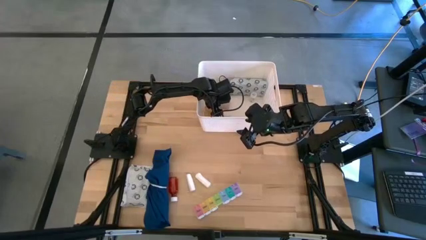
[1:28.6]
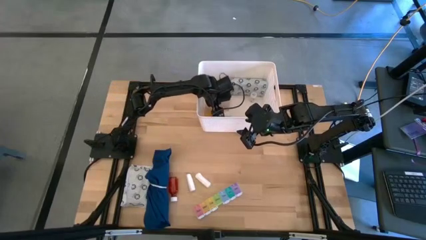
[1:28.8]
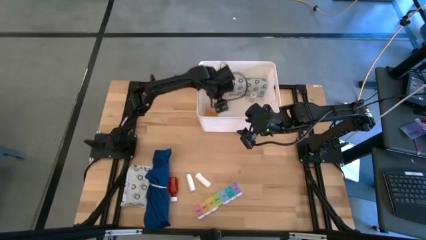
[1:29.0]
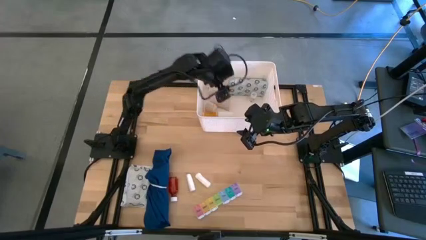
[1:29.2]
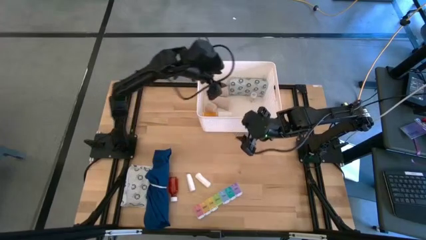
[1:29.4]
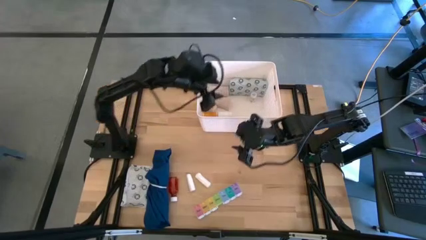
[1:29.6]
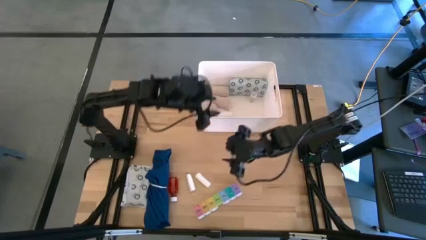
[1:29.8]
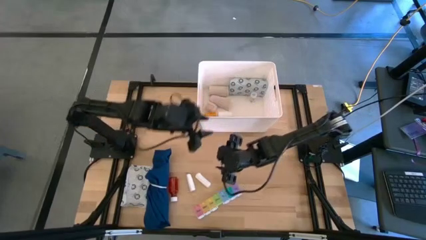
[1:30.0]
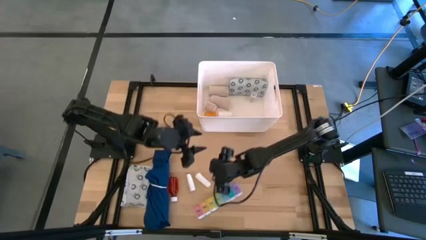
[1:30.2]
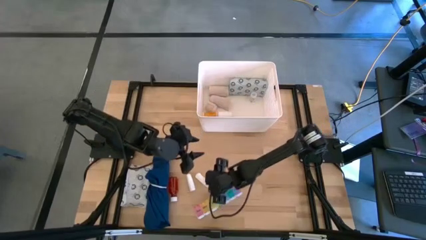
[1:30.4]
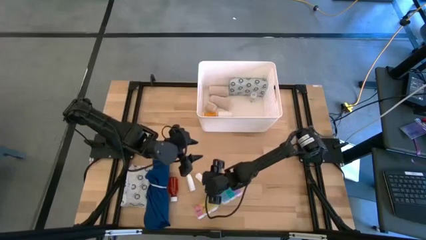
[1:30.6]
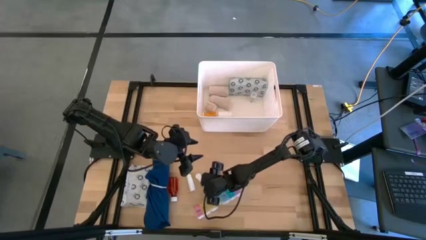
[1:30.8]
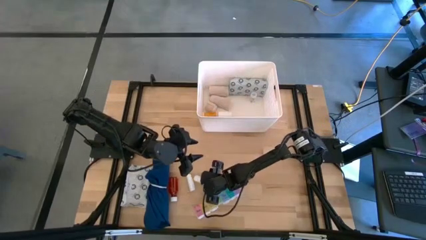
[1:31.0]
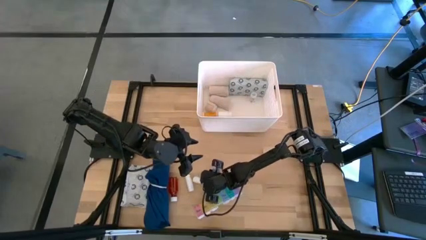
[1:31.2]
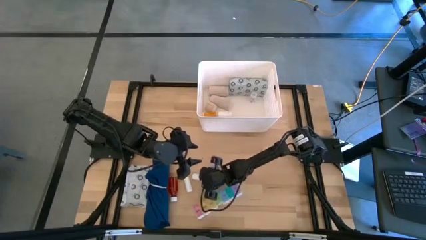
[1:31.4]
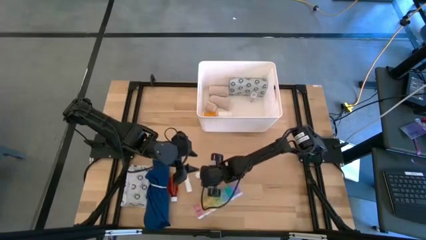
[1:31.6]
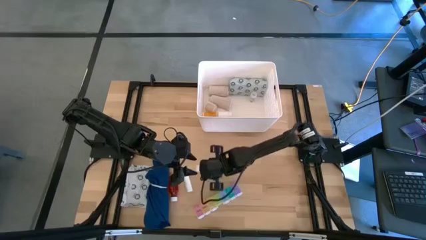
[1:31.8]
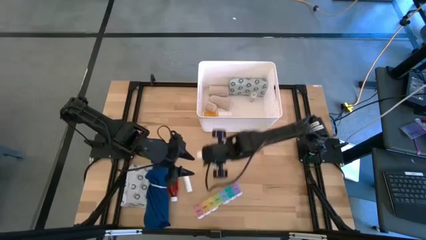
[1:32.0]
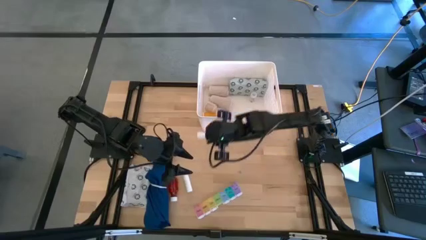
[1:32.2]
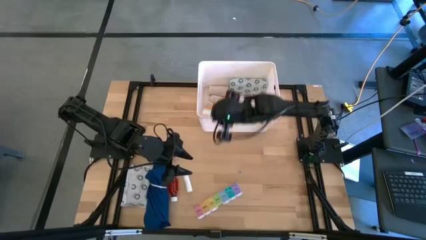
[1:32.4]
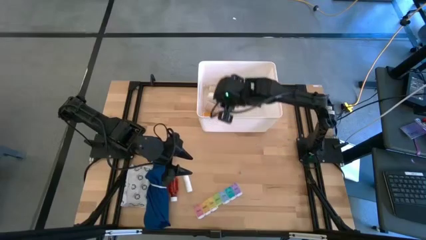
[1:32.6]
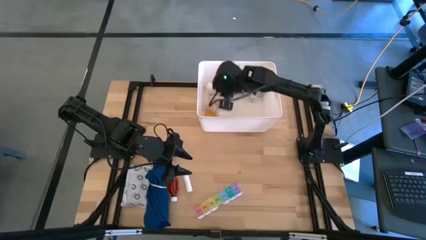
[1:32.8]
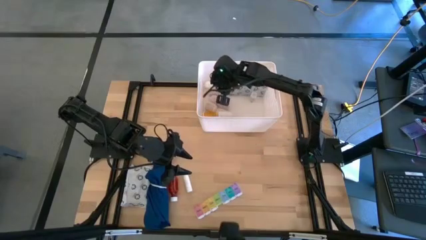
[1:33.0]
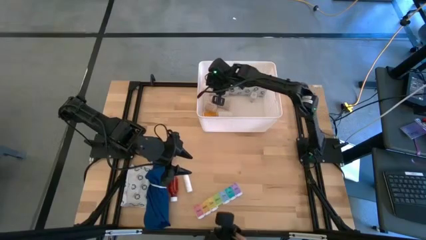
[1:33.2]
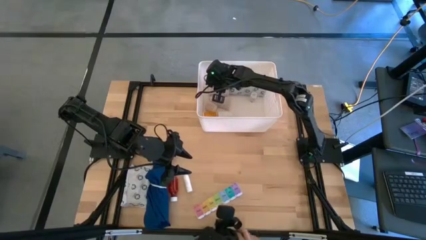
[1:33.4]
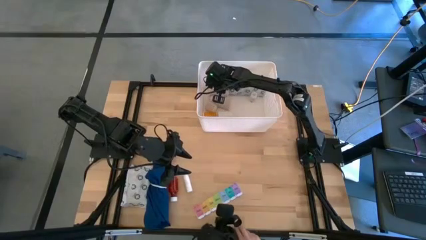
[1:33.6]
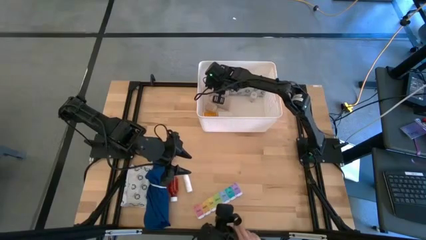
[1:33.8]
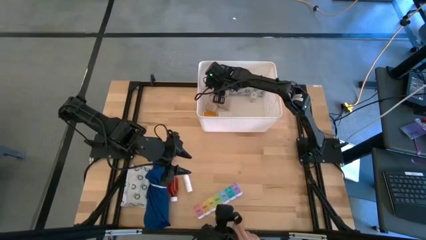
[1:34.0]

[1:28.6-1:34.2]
Task: Pick & place medical supplies in basket/bin
Put the rolled white gauze into the white container

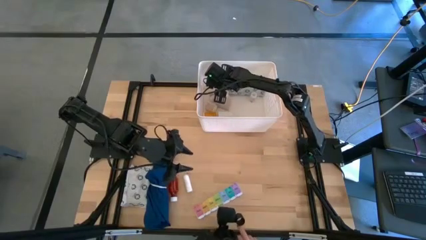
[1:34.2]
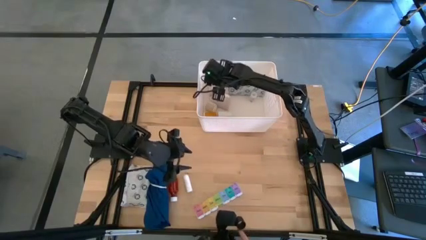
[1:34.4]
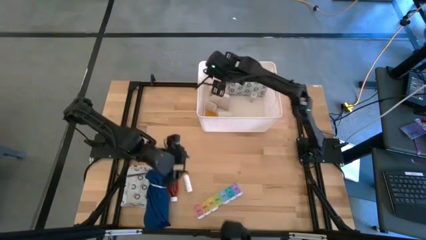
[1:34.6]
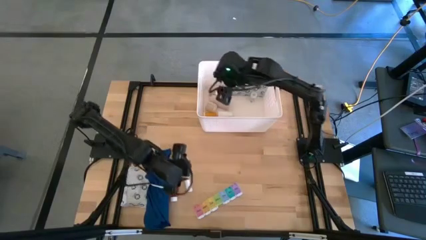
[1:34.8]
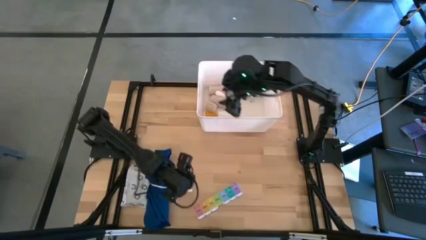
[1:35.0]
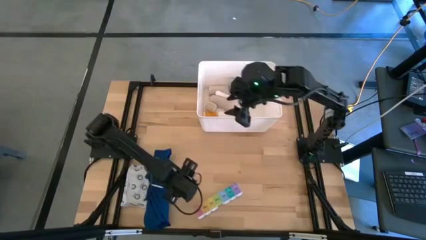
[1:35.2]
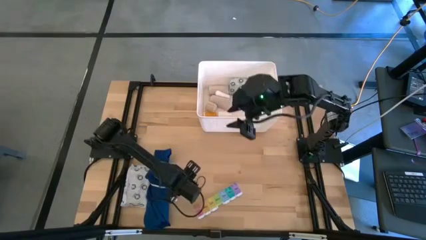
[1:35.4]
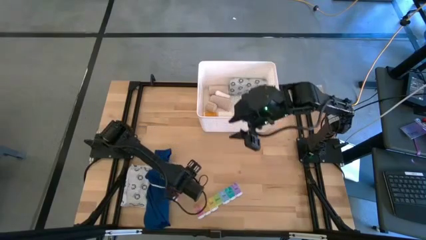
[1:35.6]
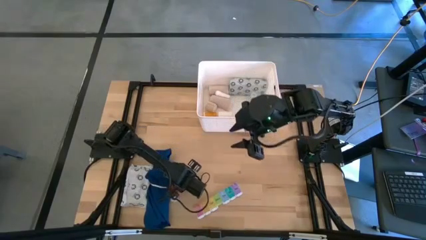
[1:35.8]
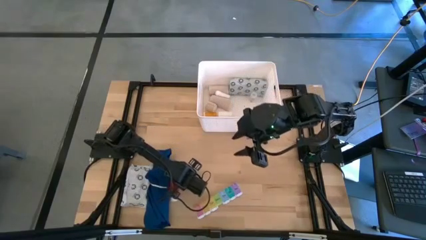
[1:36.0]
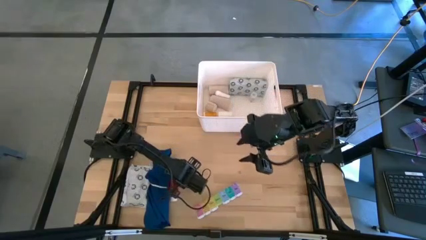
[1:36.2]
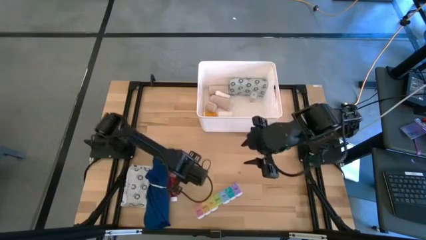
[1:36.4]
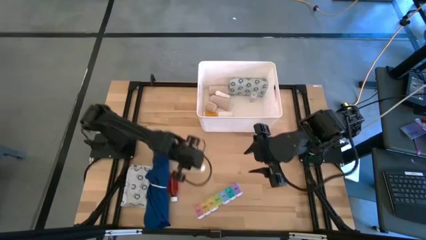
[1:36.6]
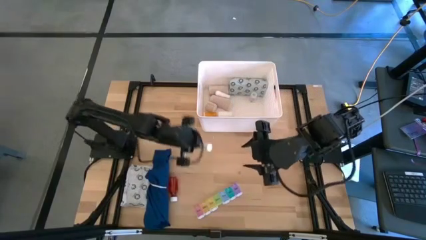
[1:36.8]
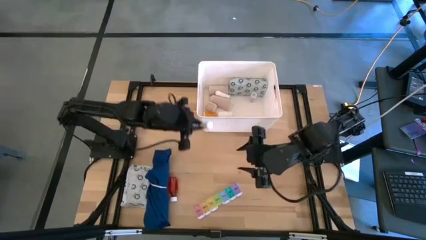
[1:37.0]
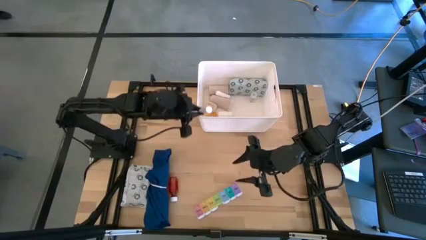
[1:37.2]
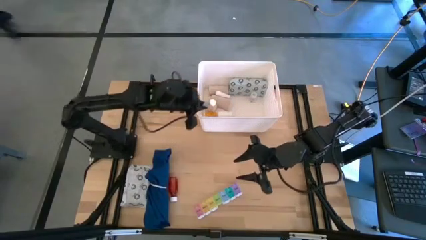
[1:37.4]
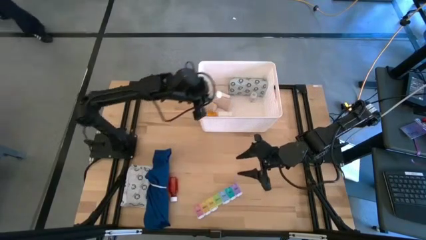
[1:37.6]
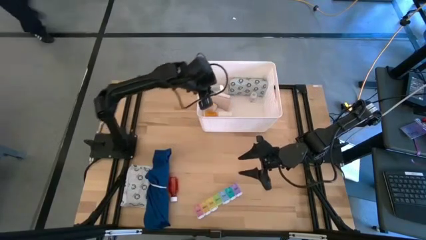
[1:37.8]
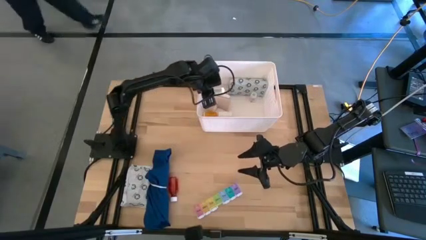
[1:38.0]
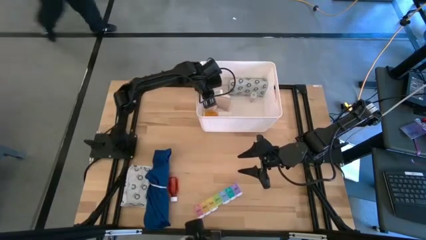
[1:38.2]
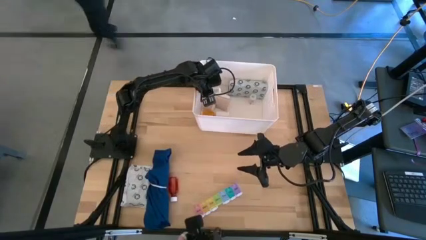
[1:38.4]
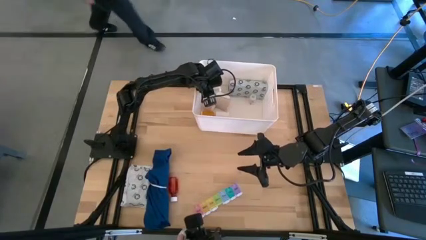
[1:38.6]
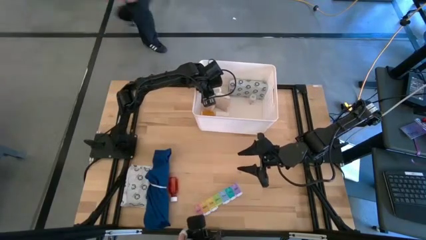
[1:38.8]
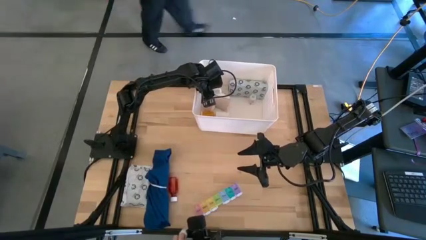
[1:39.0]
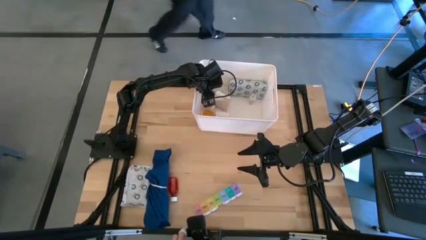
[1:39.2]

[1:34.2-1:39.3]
Put the rolled white gauze into the white container

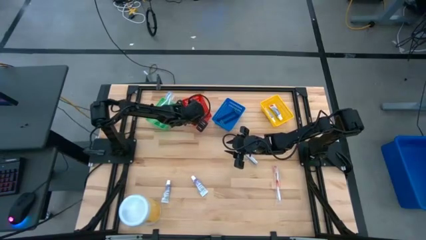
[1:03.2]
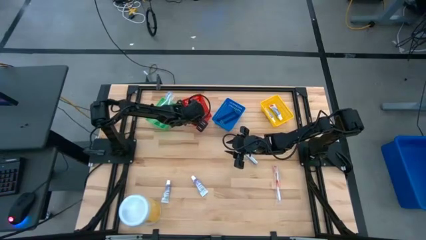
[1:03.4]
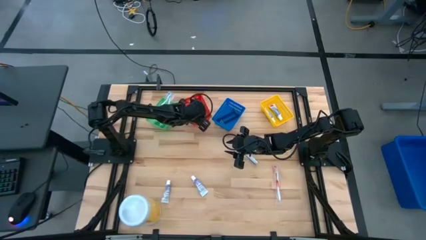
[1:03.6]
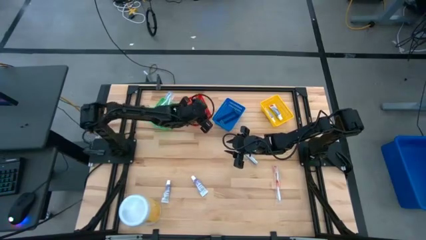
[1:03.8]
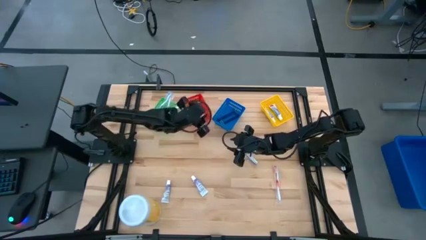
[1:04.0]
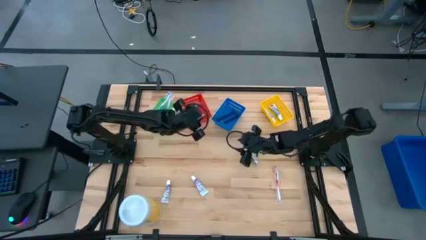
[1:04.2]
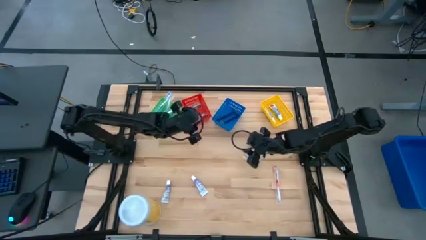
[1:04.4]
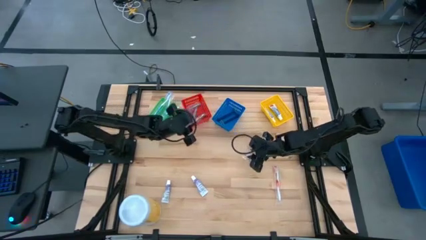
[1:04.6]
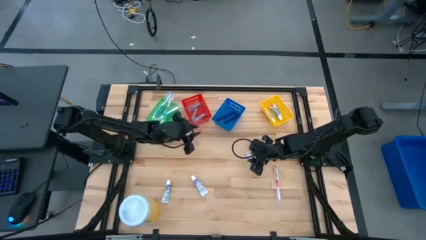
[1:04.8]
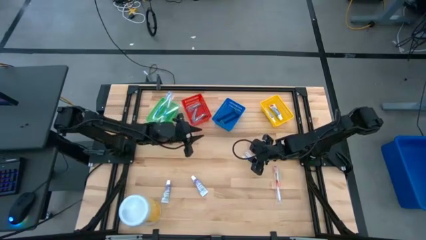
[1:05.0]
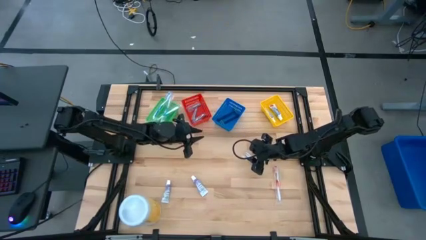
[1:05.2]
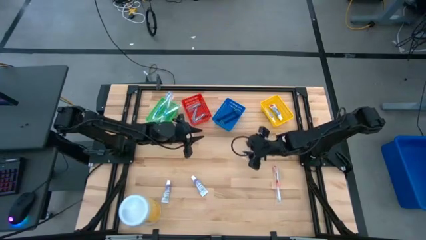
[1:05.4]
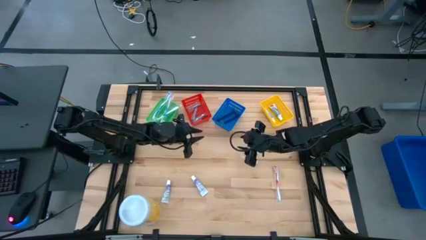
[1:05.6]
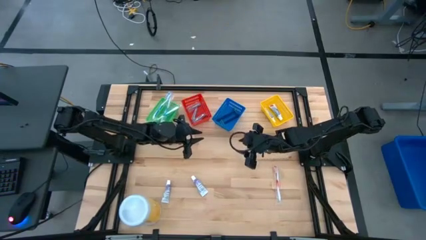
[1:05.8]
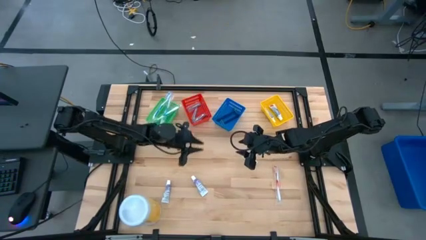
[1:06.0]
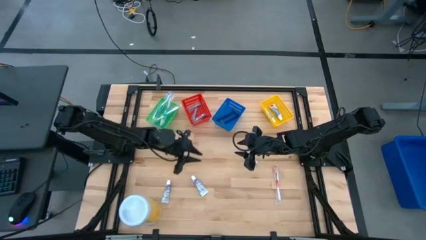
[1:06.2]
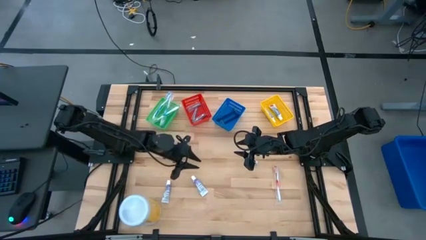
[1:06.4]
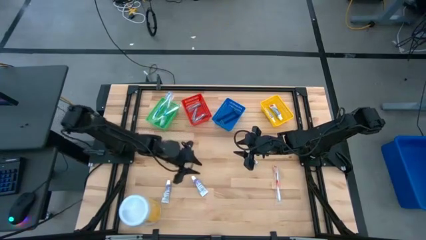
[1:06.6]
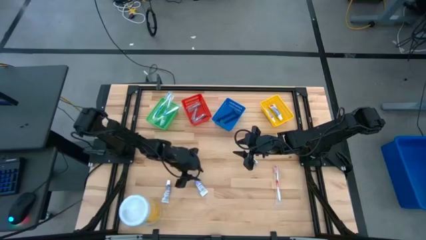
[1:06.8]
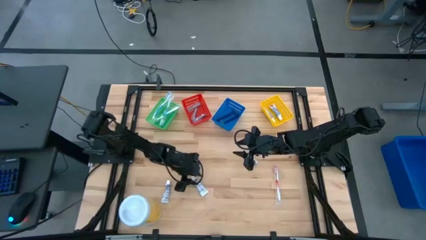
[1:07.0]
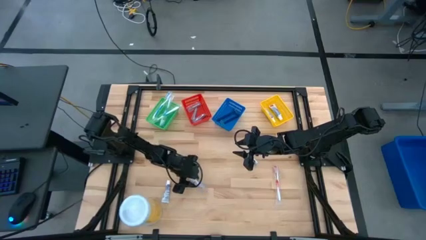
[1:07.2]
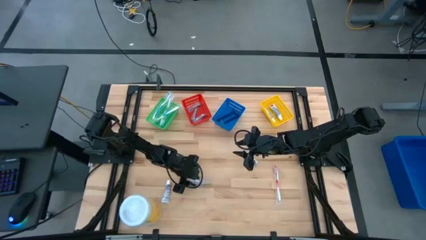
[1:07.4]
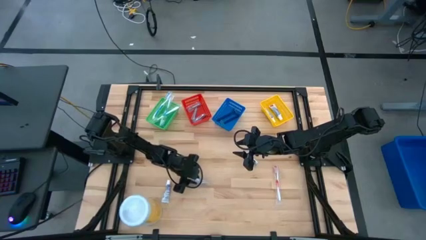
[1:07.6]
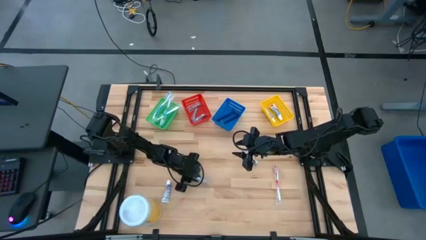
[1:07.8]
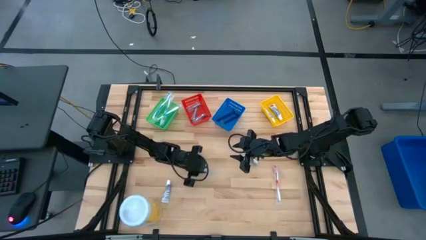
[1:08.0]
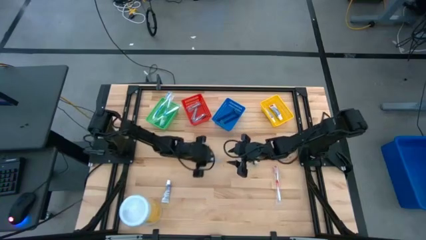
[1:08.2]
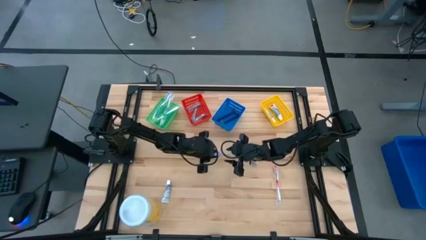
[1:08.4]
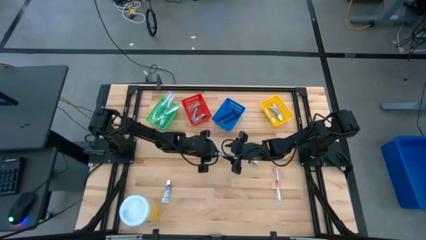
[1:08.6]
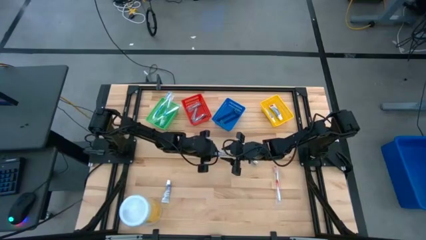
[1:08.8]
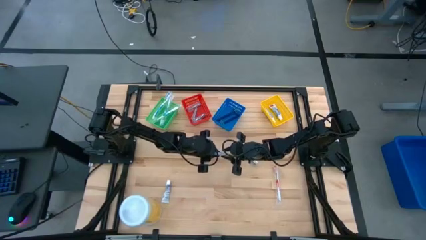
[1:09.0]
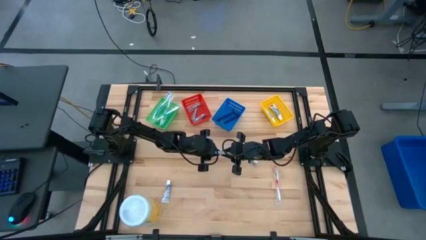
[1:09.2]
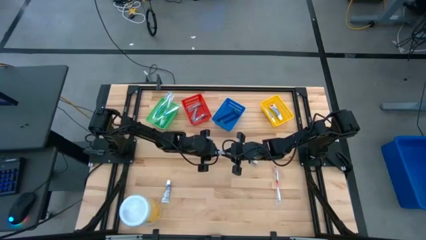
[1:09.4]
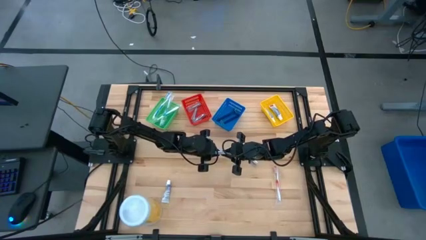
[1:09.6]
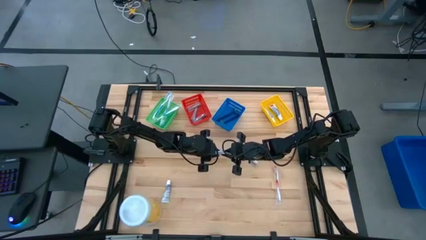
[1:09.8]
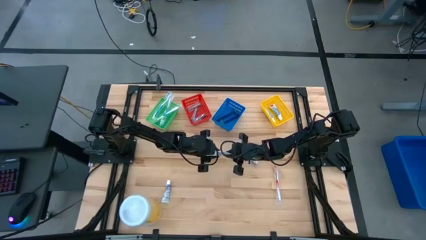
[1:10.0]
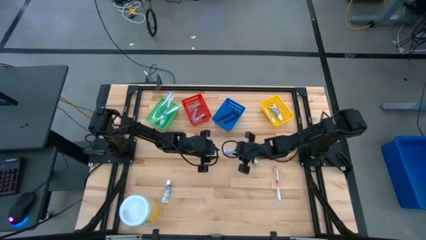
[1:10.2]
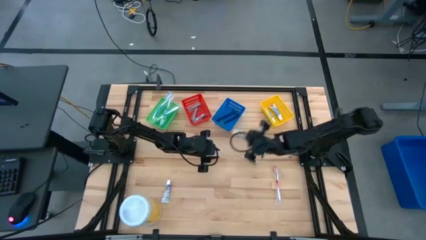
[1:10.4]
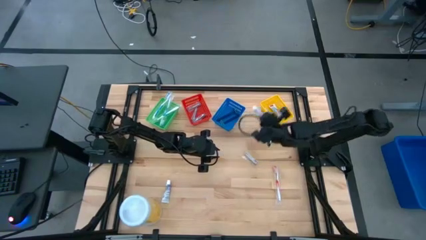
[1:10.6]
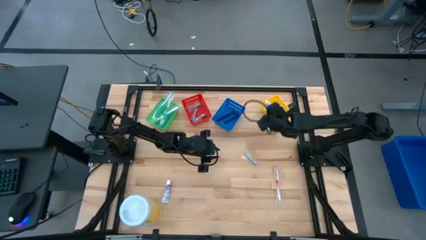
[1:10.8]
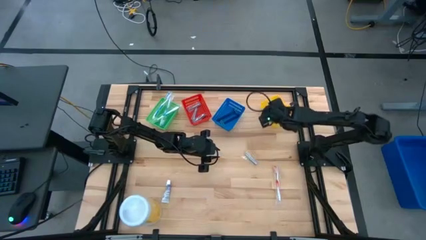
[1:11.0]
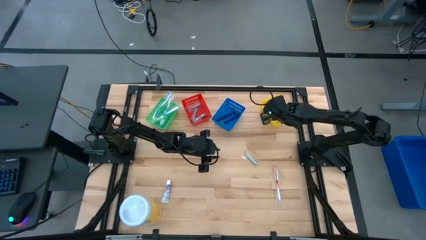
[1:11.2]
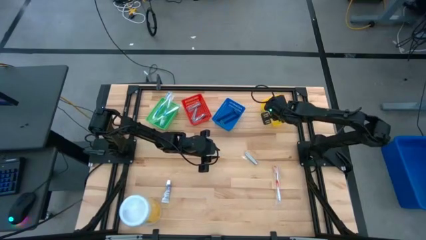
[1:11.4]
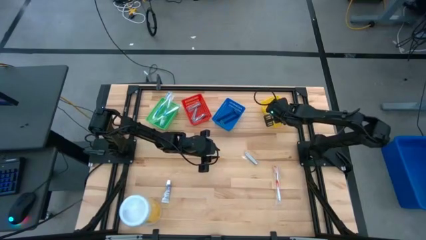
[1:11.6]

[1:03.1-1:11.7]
Task: Pick & Place Travel size toiletries
Put the right toothpaste into the yellow basket
